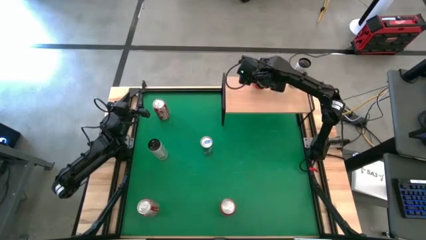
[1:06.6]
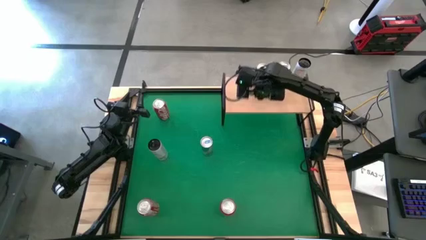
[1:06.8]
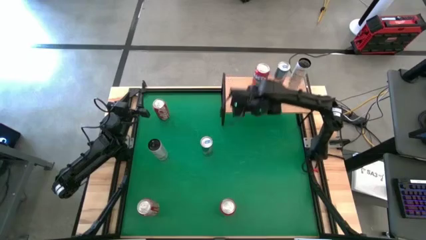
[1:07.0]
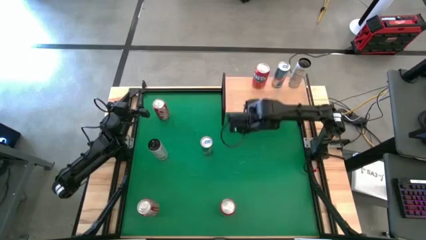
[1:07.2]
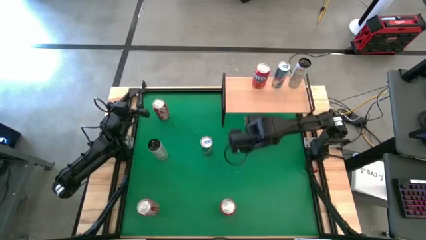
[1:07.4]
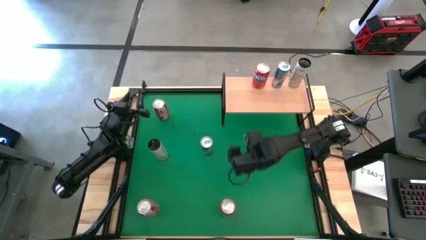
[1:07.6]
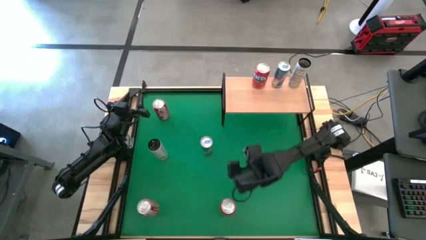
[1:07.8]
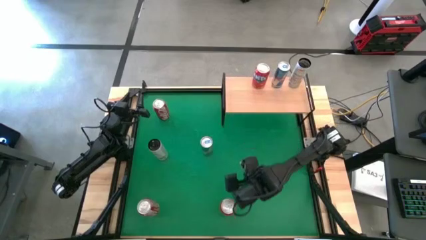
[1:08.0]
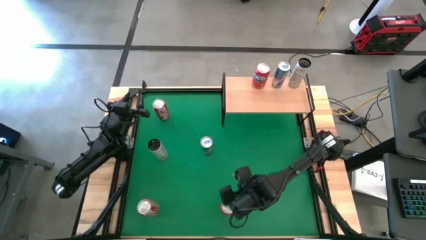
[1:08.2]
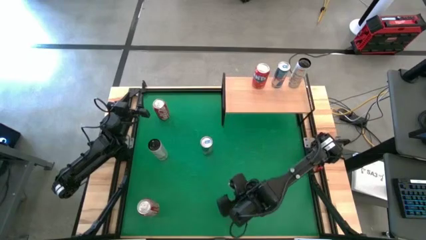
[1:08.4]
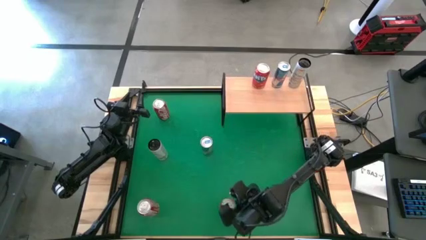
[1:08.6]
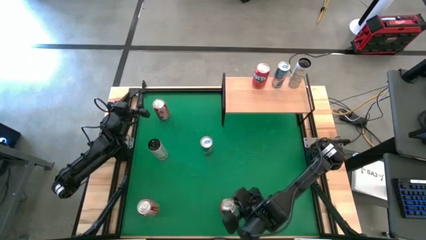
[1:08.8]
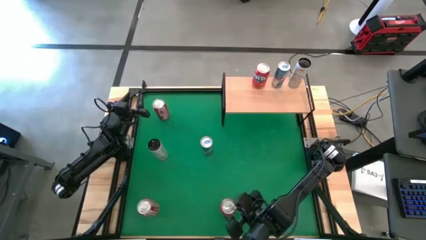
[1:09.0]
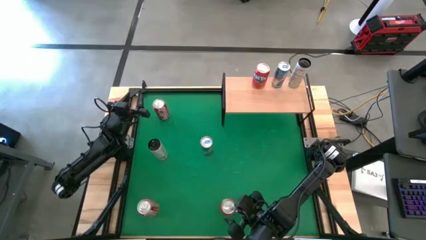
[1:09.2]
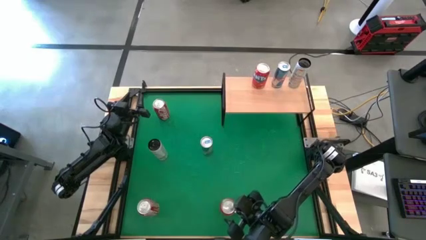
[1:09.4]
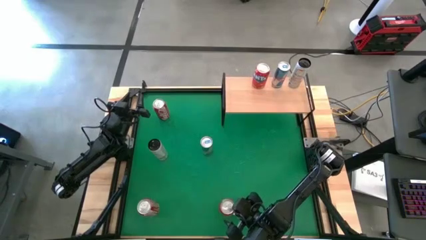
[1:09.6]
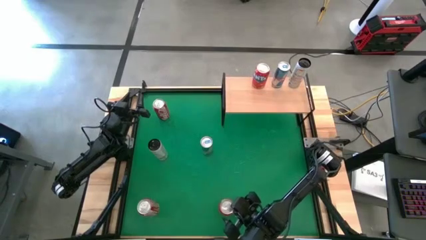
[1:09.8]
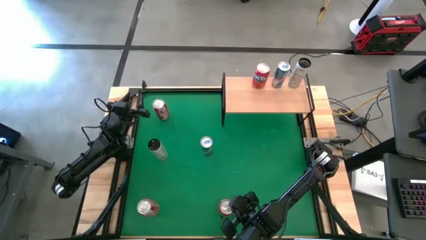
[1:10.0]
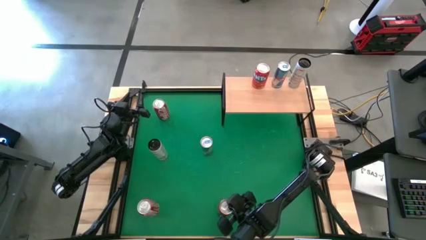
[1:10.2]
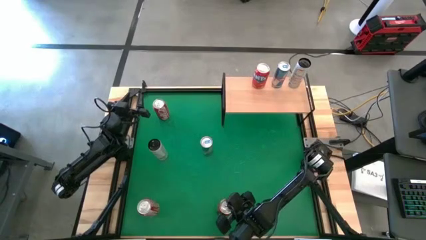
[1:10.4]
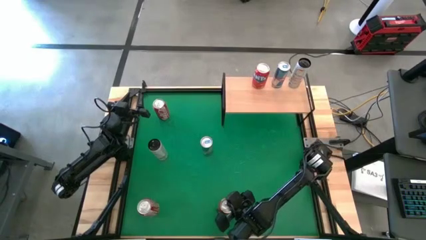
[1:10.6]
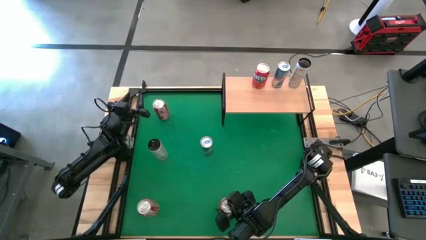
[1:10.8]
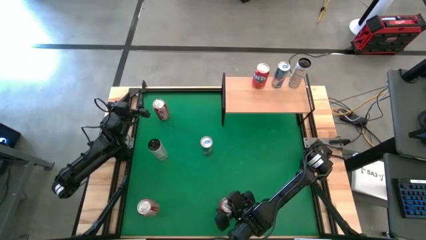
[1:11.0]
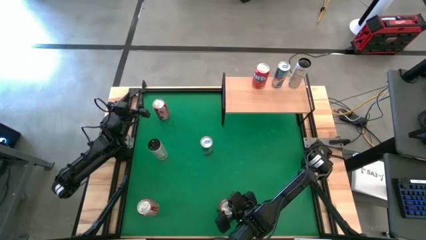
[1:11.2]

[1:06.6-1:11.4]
Task: Place canned beverage on shelf
Put the red soda can on the shelf aligned with the other red soda can

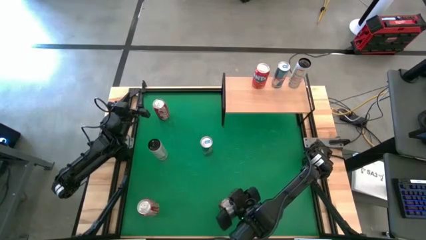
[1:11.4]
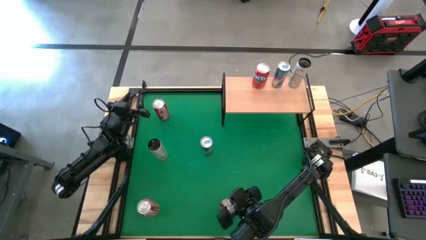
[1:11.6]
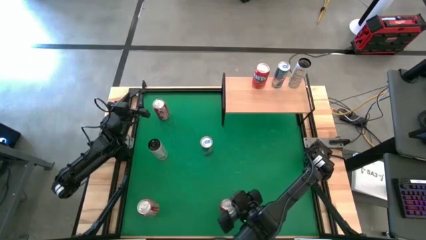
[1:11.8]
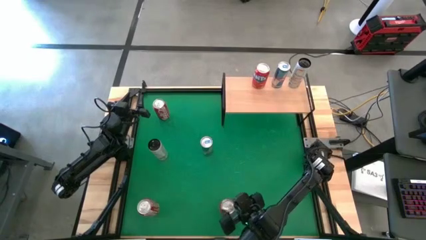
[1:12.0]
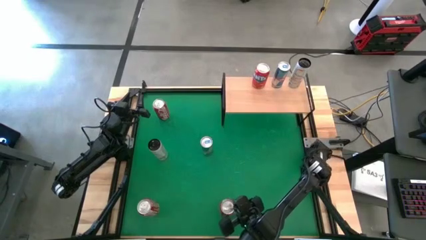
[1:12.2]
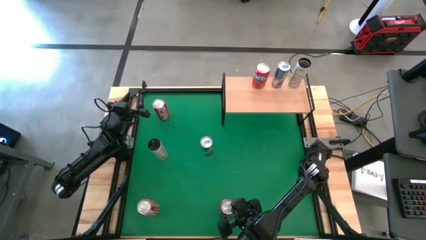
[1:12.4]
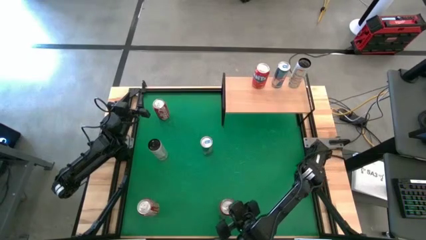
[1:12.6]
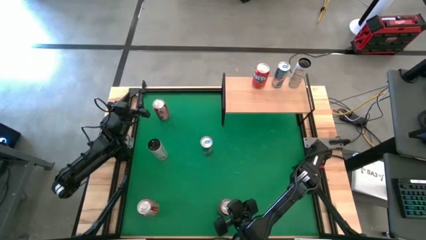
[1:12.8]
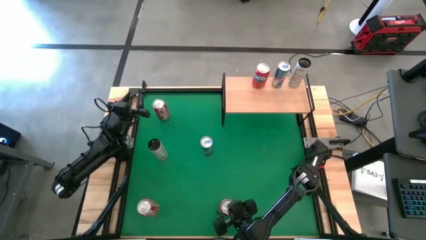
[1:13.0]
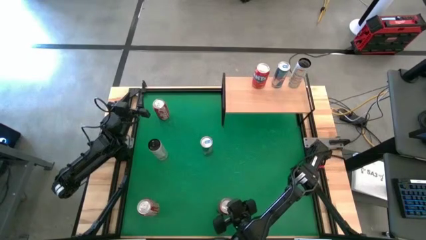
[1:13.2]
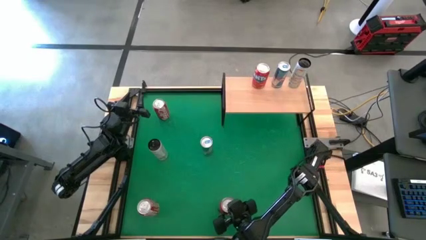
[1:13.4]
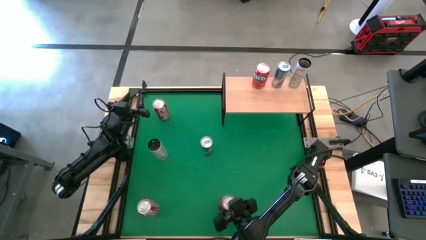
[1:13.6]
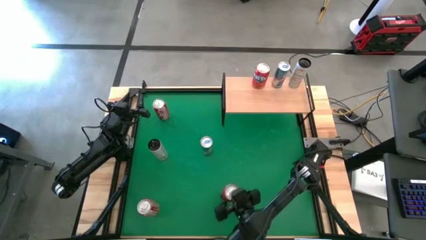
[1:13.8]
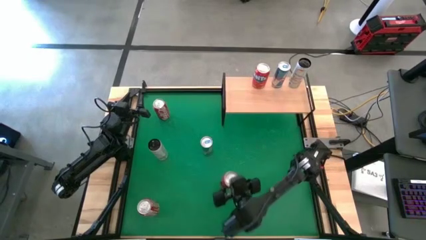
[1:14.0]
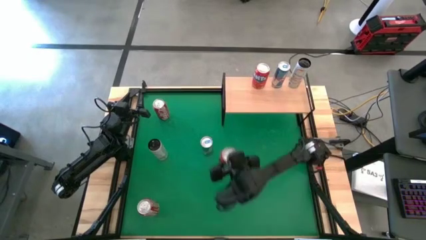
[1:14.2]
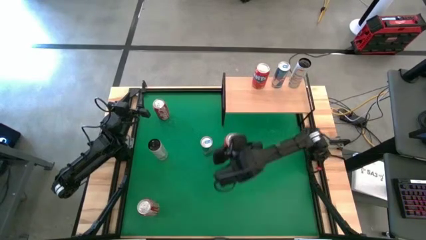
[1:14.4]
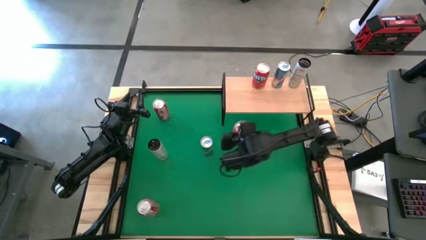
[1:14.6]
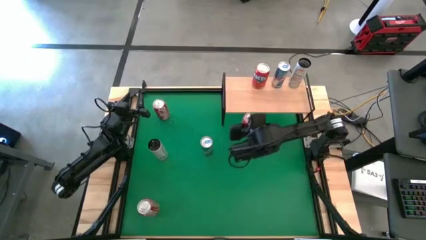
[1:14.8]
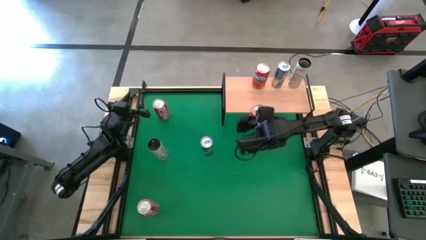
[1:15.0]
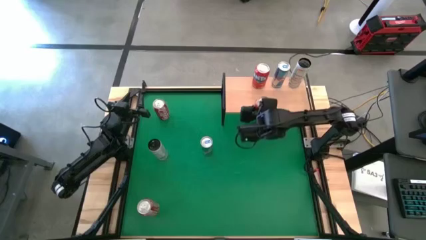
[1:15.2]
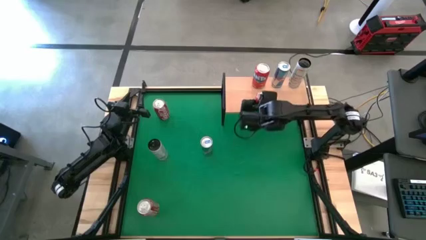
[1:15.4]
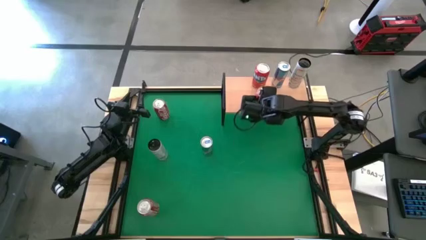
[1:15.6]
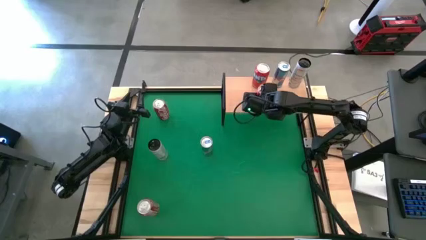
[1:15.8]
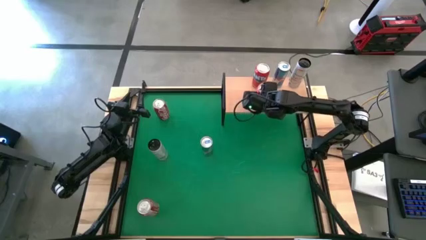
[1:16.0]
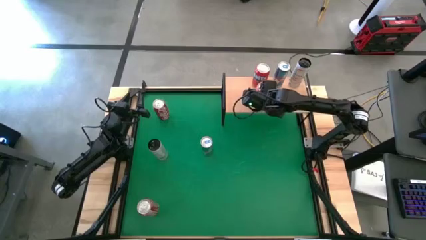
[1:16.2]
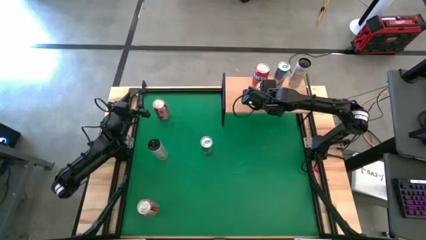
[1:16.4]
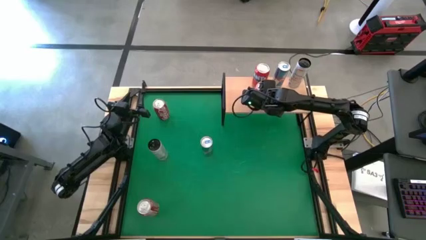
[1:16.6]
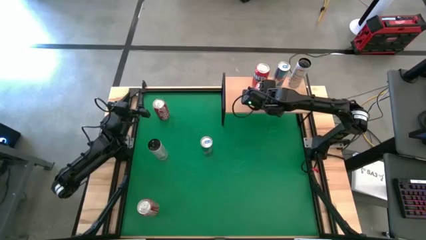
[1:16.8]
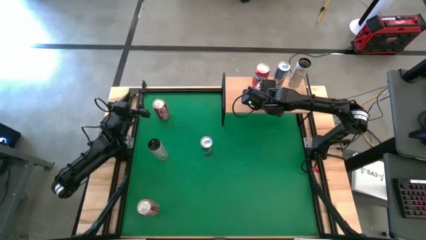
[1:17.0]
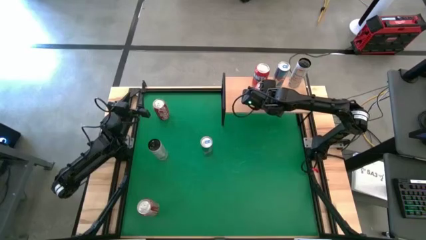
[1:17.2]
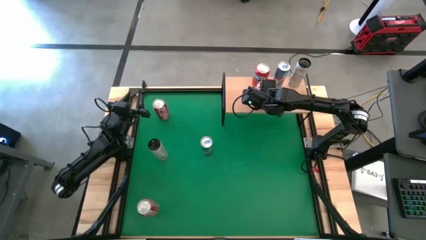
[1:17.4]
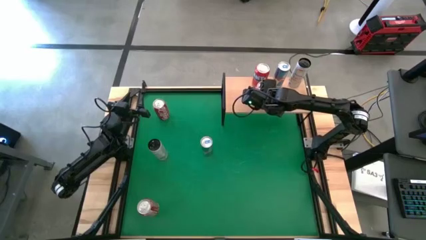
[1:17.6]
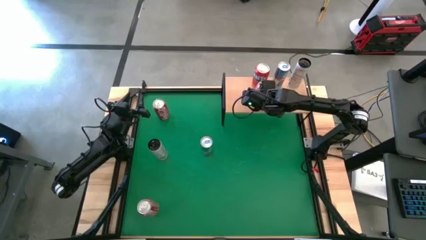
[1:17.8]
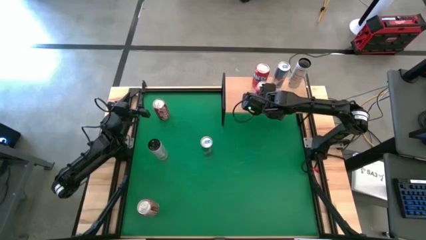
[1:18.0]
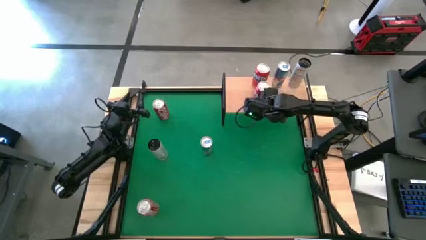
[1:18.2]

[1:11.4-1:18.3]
Put the red soda can on the shelf aligned with the other red soda can

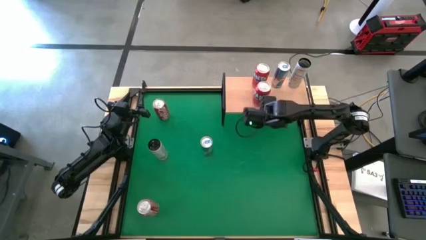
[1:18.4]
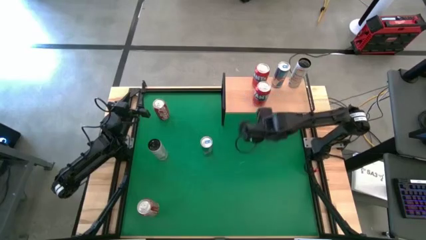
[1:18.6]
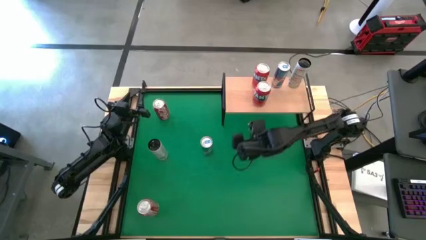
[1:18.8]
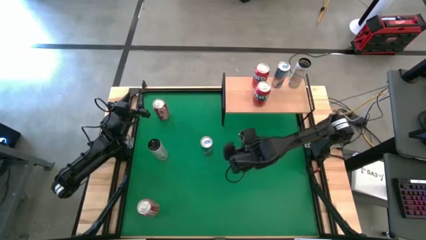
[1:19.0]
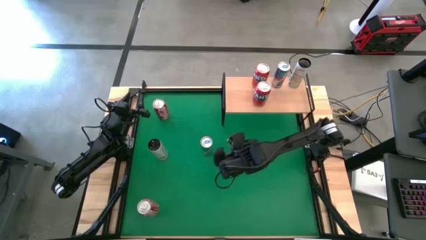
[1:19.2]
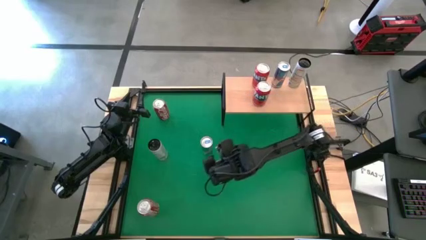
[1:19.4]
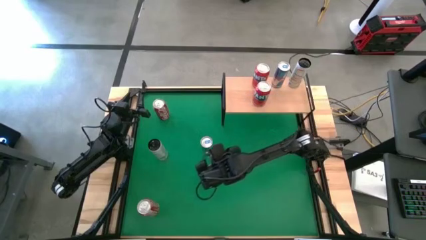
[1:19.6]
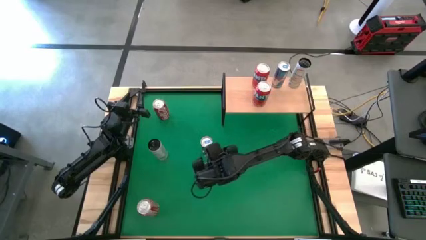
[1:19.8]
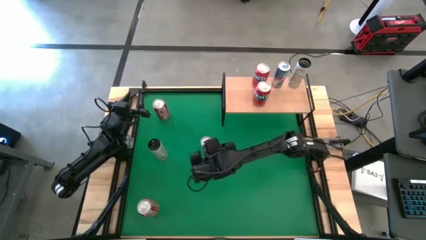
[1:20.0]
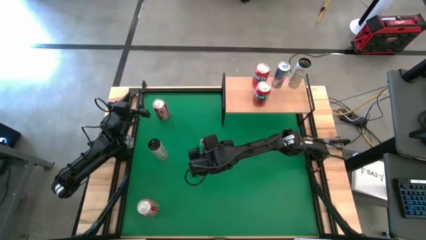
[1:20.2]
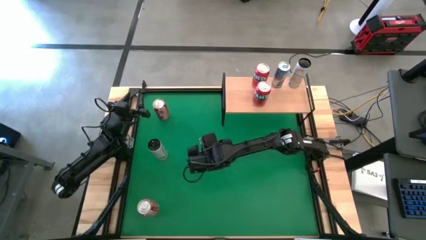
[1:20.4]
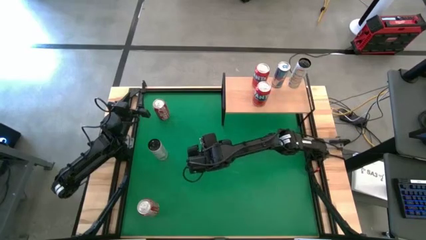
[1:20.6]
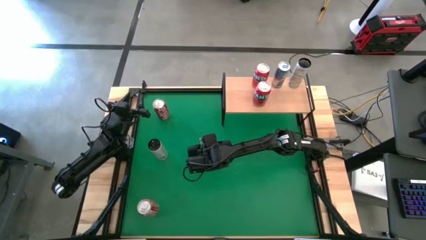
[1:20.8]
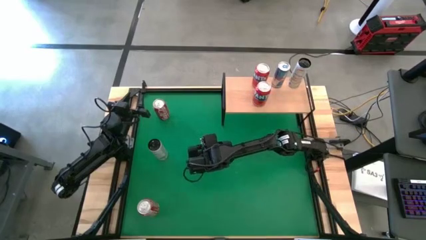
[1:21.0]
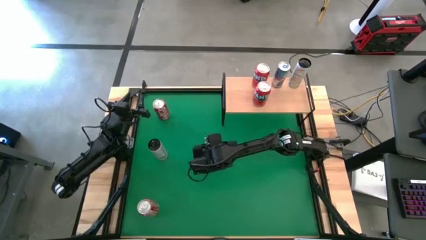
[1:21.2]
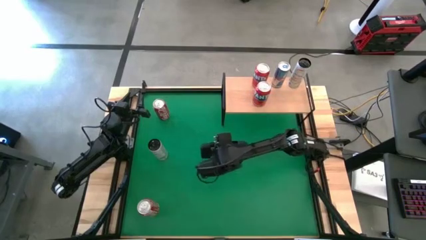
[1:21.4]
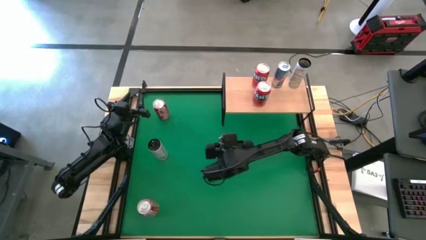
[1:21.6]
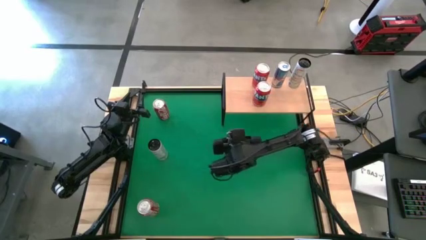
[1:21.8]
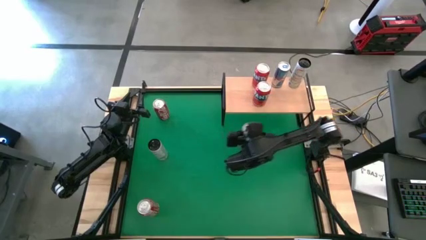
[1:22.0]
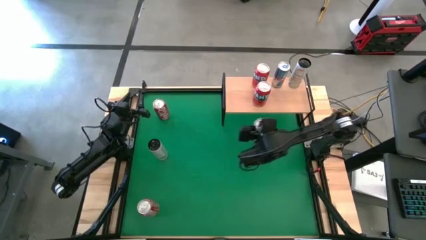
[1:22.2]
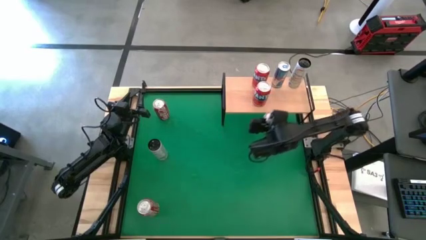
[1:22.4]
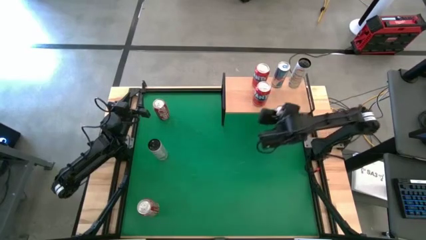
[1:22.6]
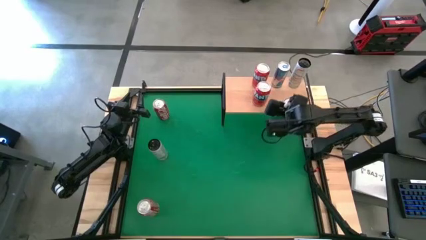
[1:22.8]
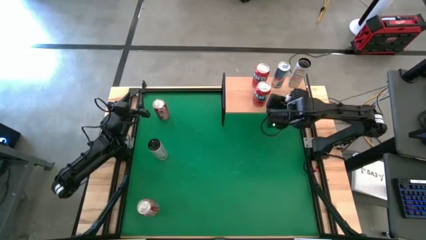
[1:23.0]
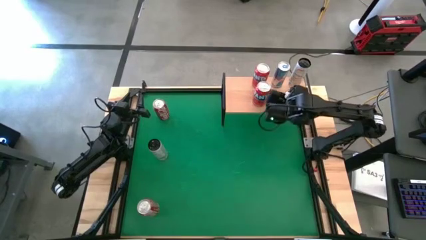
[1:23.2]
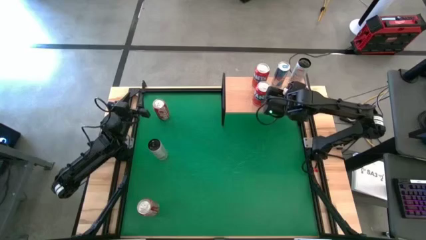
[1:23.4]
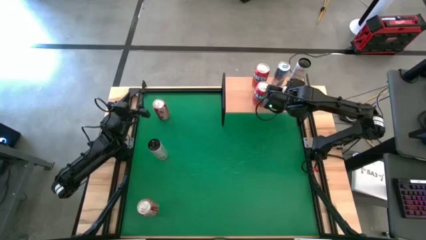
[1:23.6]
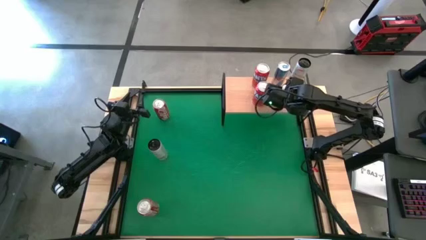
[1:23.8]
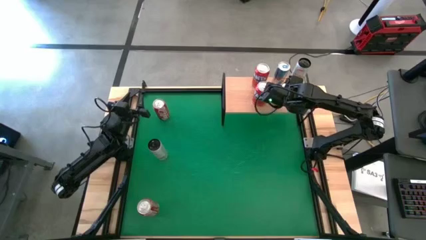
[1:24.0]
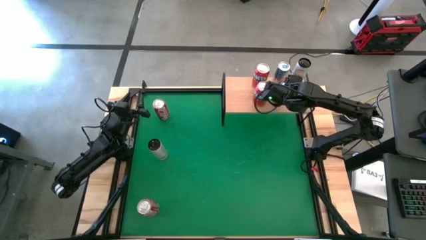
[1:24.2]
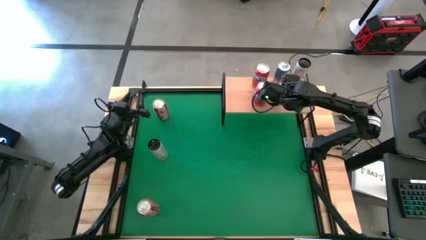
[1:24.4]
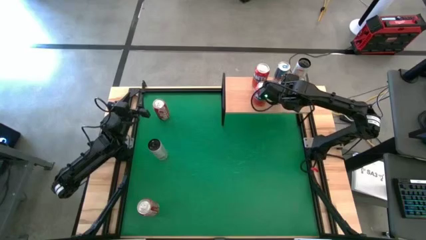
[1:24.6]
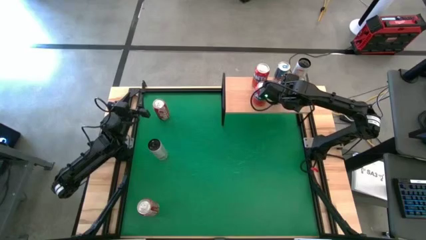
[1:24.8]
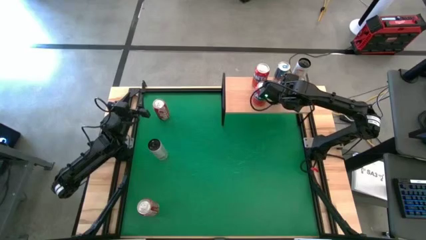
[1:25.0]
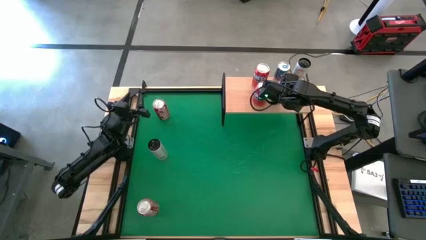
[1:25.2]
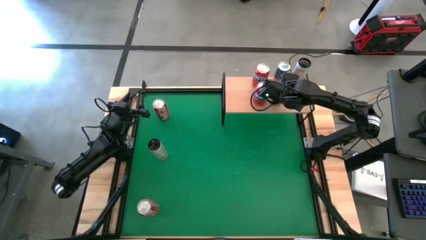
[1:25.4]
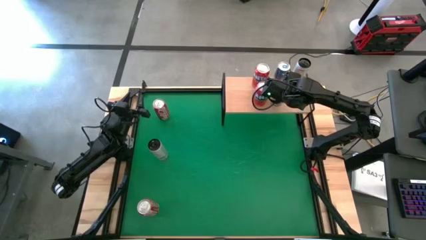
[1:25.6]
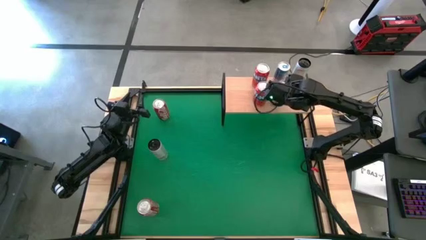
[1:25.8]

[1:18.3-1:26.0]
Put the blue soda can on the shelf aligned with the other blue soda can
